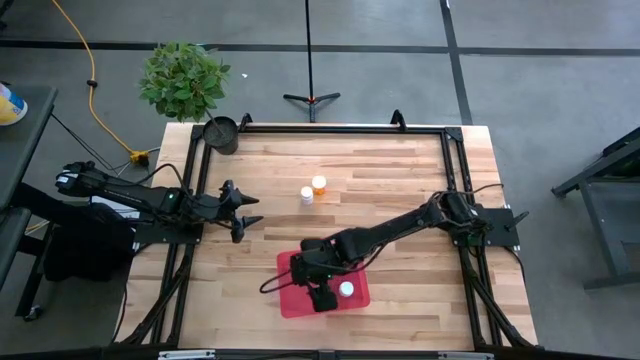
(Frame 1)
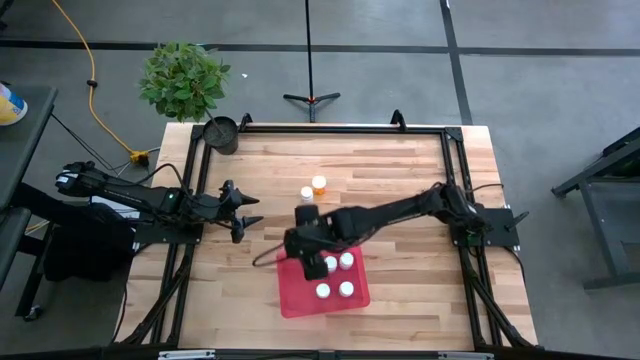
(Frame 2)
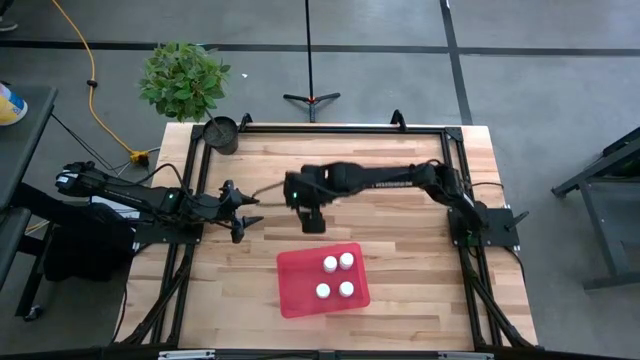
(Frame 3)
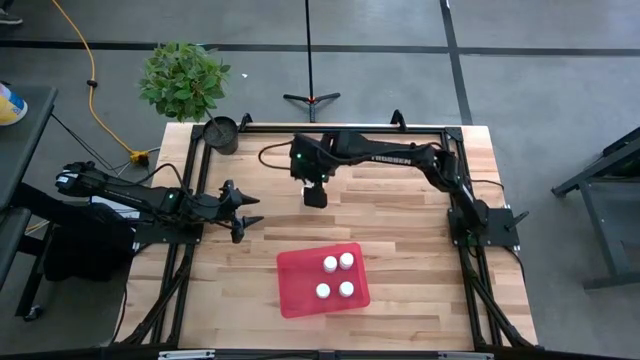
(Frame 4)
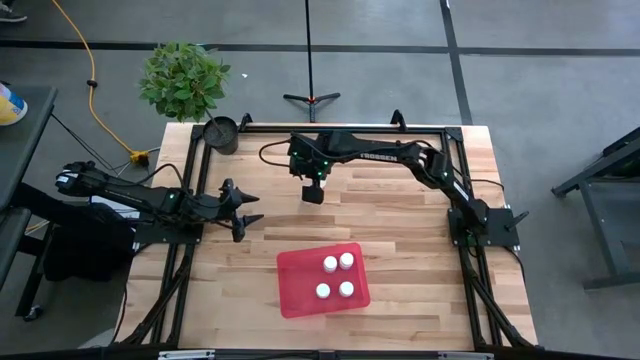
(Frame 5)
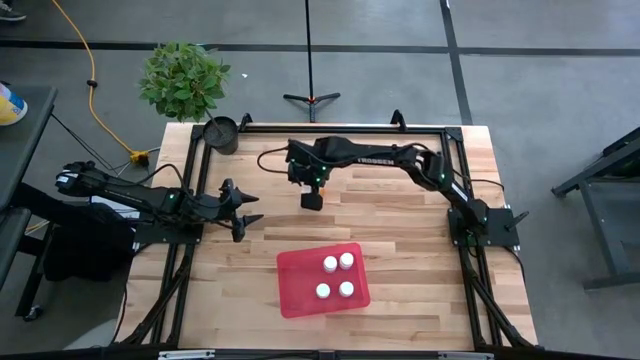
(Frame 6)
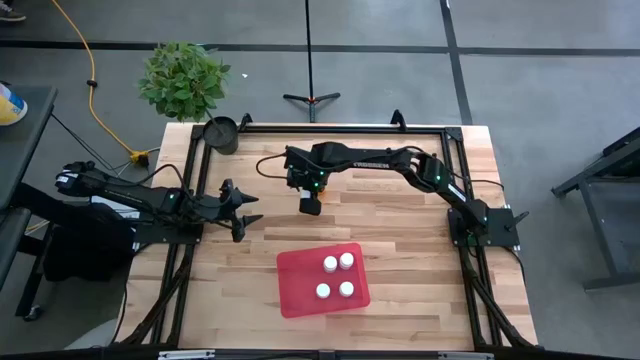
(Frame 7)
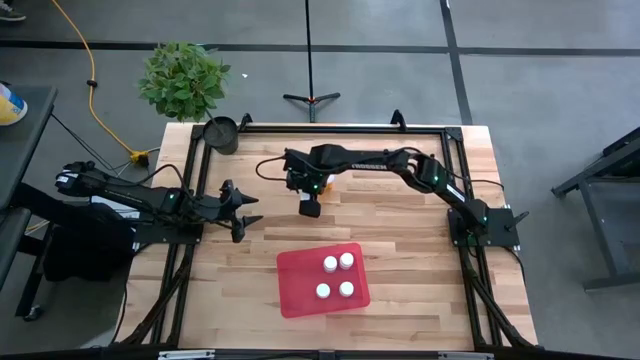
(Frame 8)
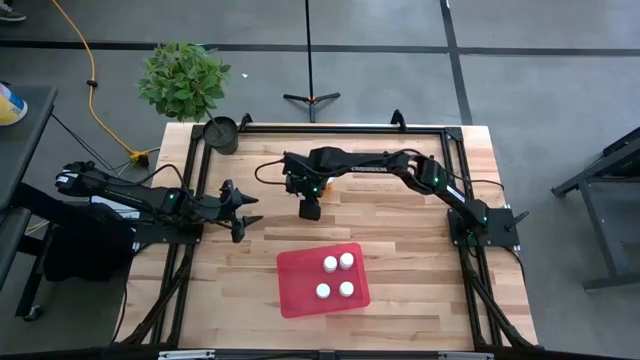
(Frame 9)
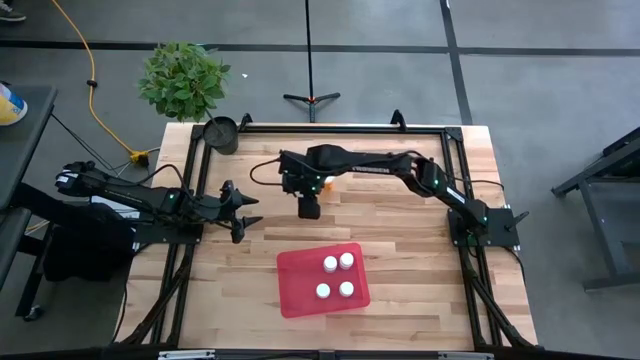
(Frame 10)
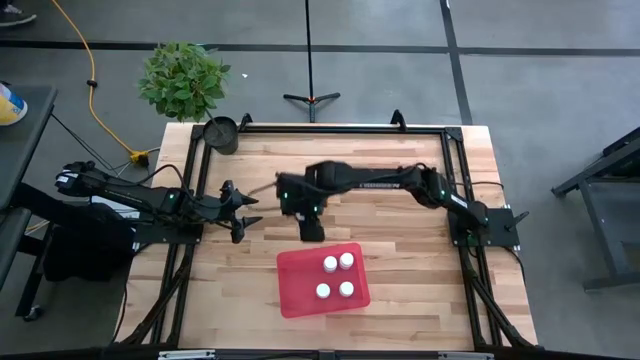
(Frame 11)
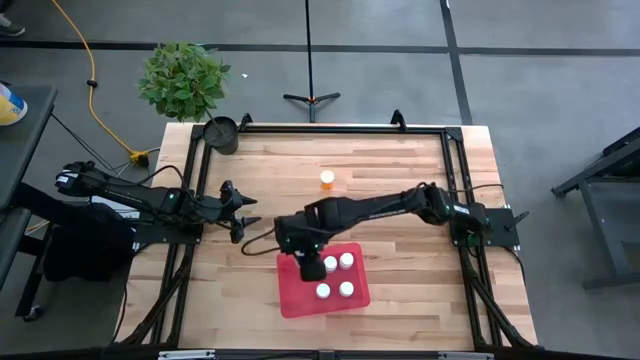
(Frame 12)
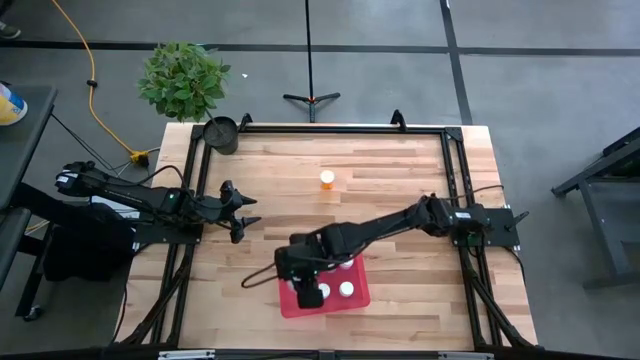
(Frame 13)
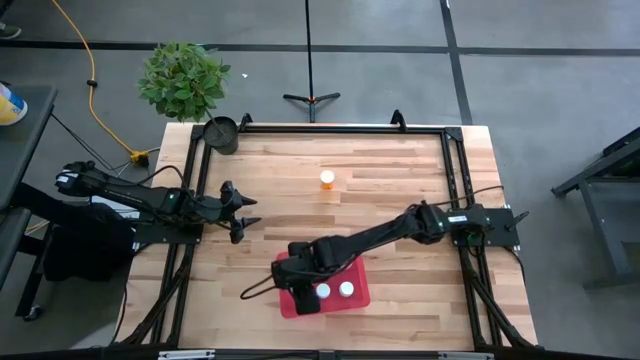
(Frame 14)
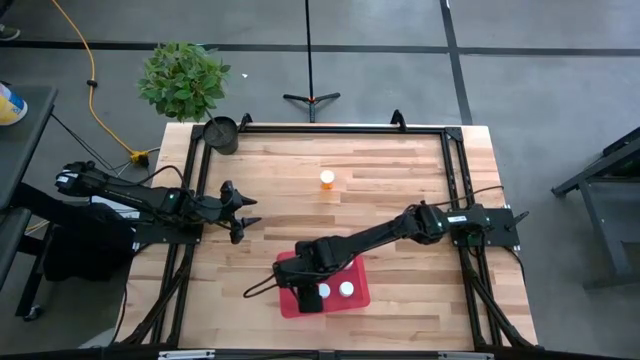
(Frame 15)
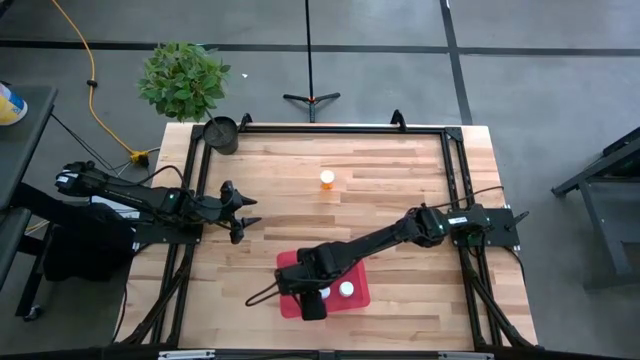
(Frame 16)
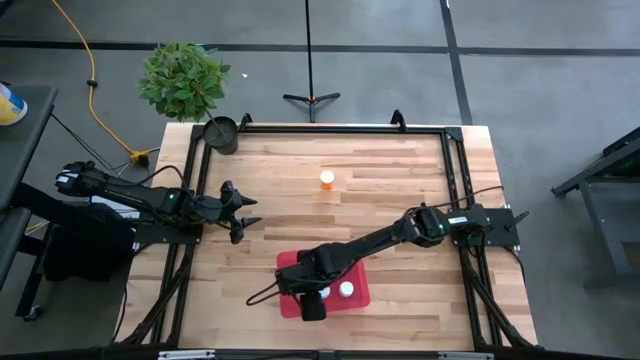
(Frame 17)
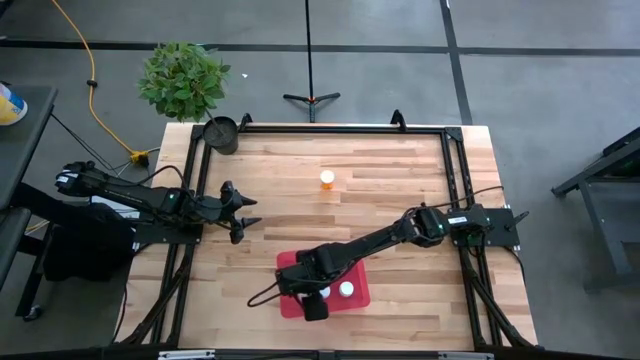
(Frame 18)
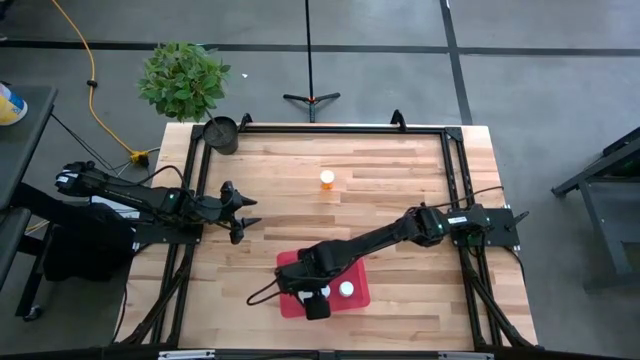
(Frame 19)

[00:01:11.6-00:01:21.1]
Task: Pick and place pill bottles into a basket
Put the white pill bottle into the red bin

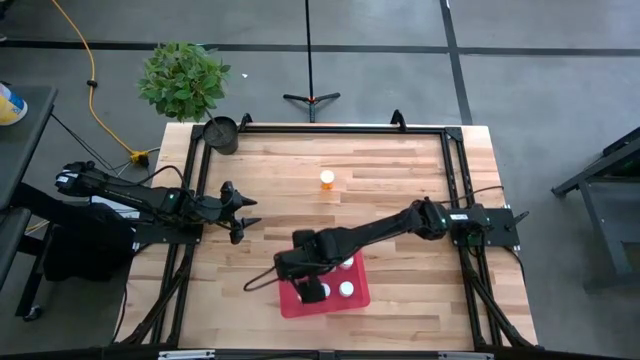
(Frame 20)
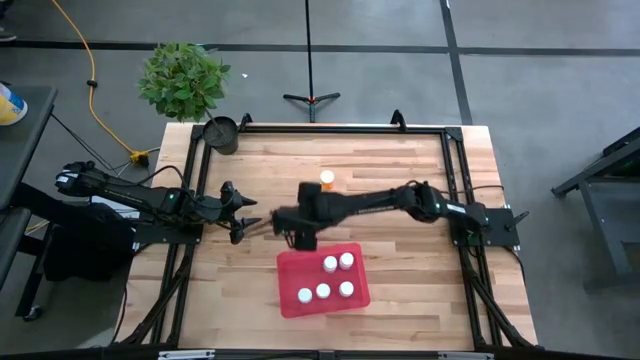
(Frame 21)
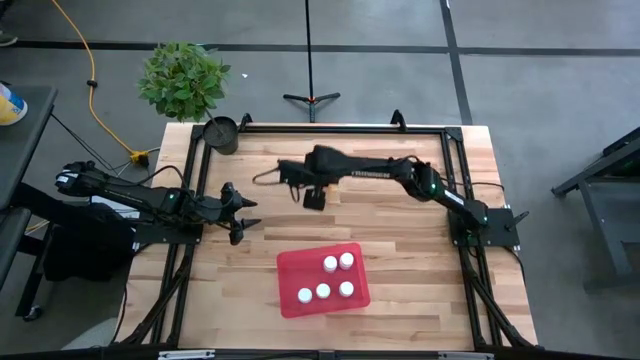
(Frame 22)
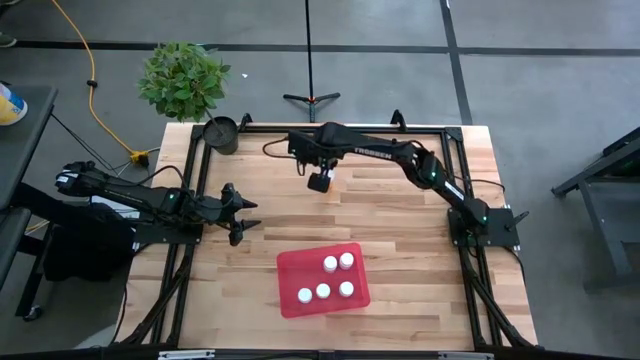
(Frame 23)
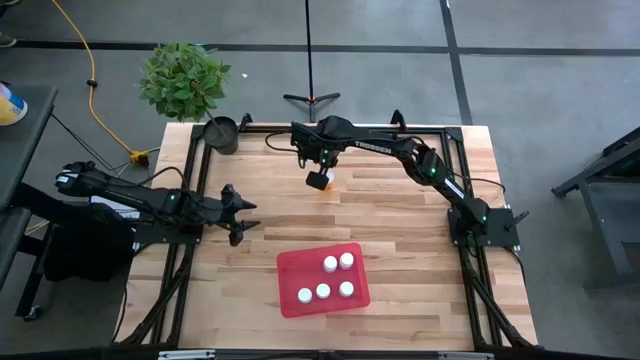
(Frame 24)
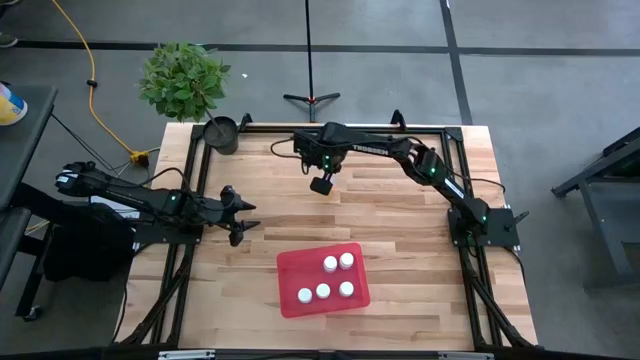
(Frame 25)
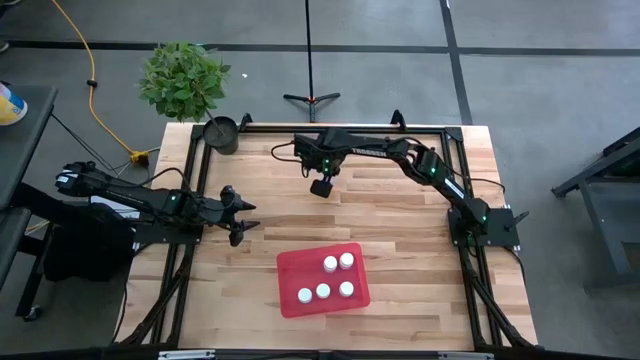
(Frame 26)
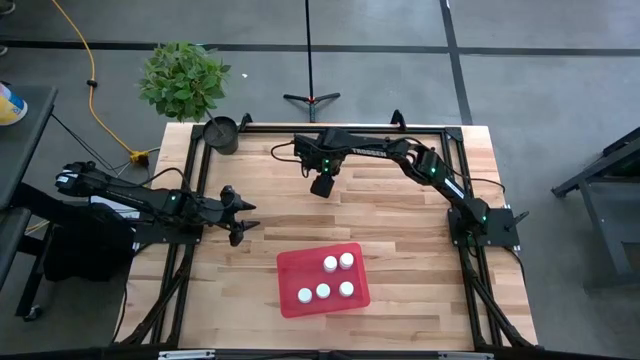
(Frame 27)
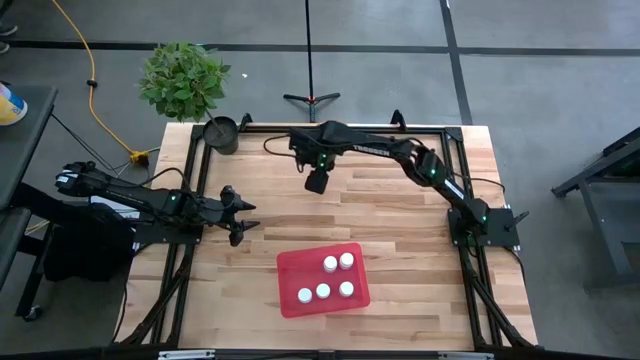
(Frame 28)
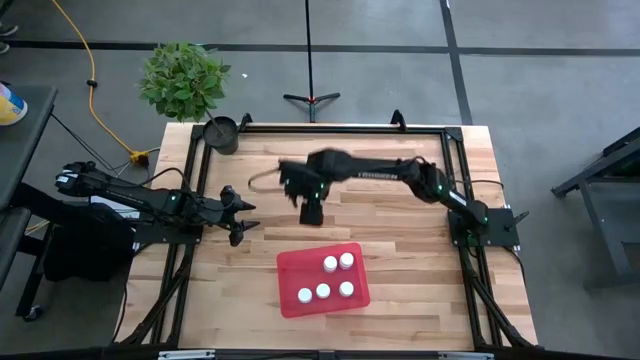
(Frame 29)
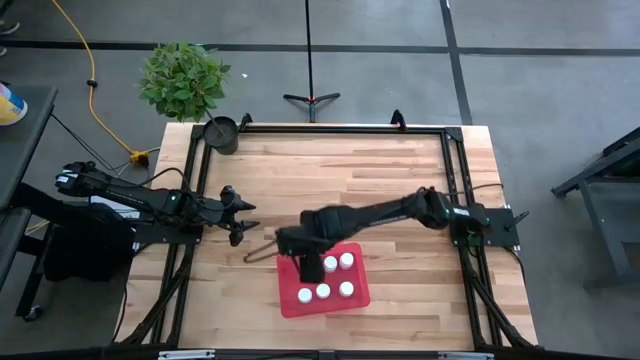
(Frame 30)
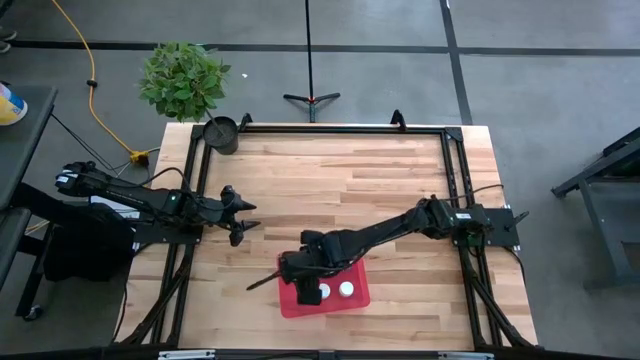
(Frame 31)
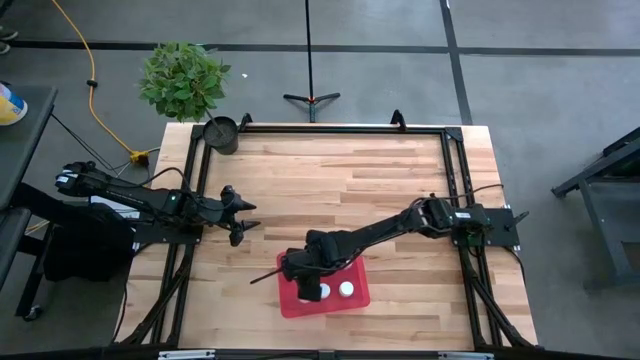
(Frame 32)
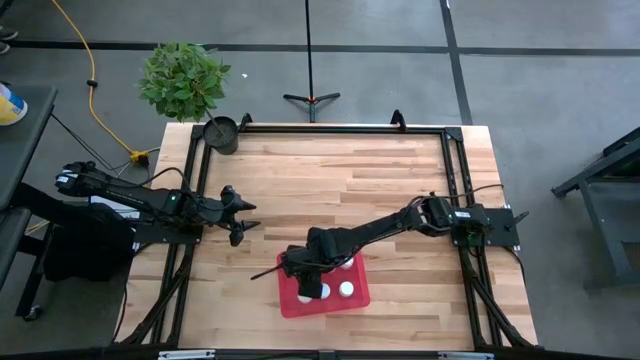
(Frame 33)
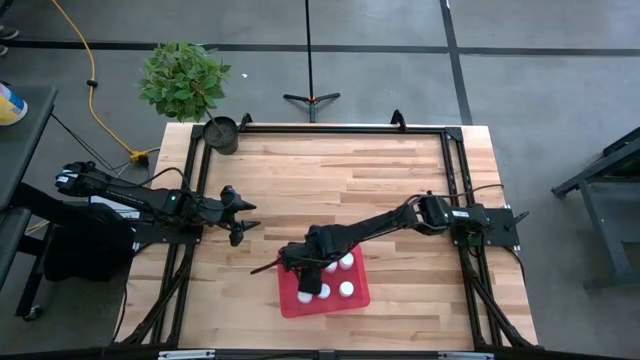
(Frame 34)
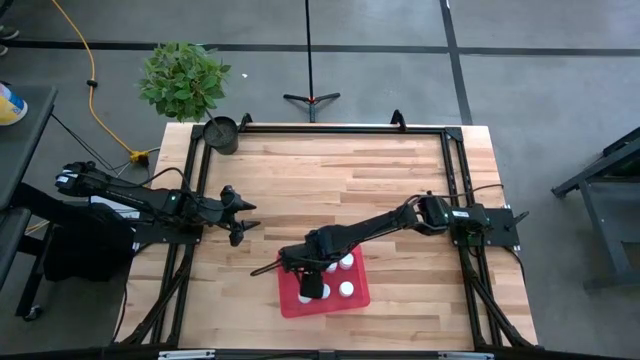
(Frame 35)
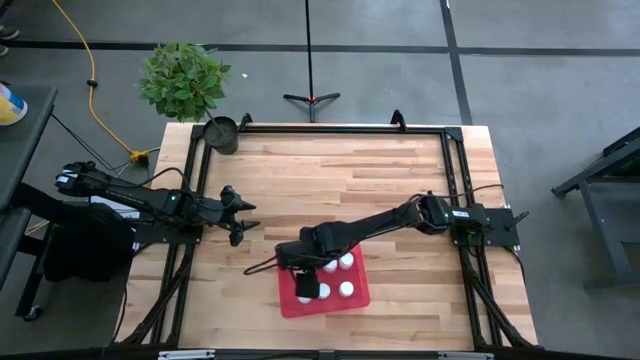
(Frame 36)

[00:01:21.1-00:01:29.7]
Put the orange pill bottle into the red bin
